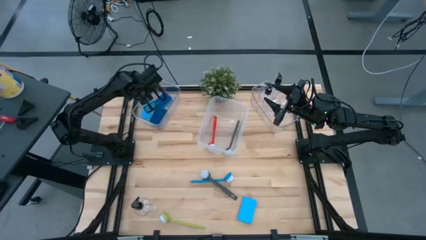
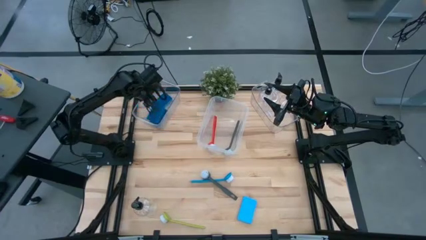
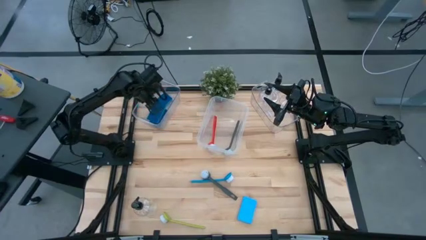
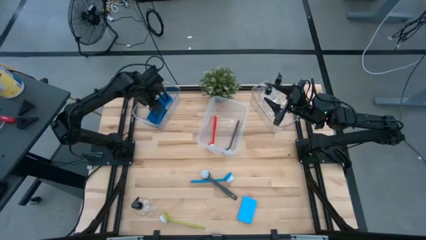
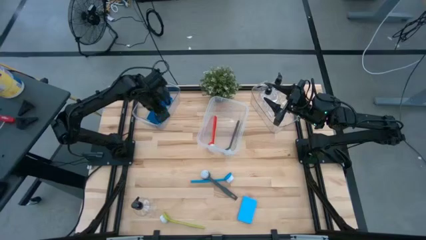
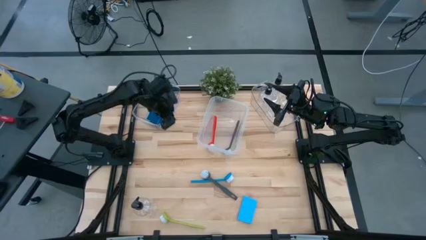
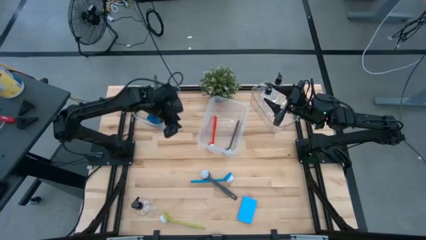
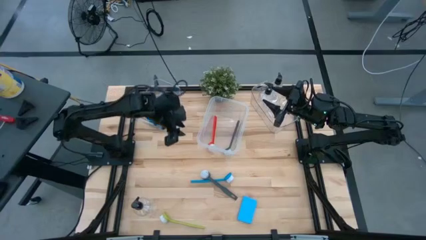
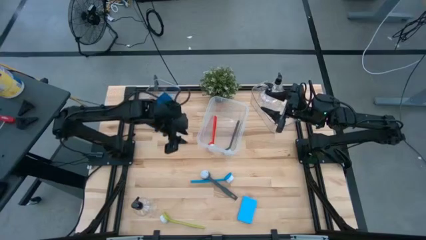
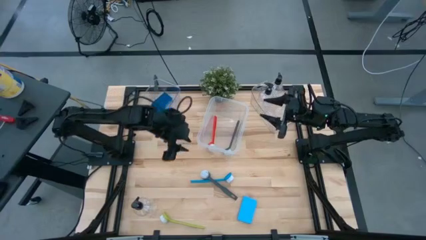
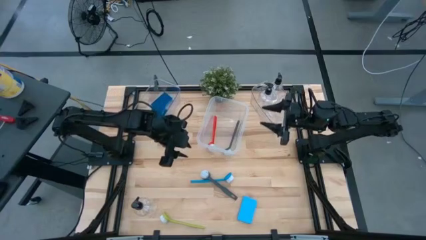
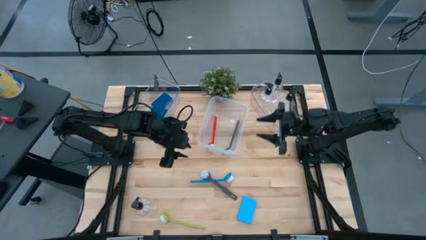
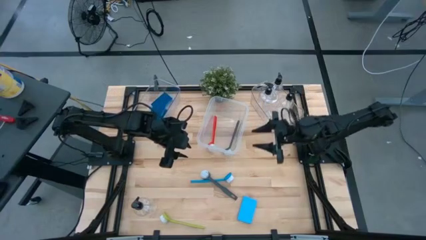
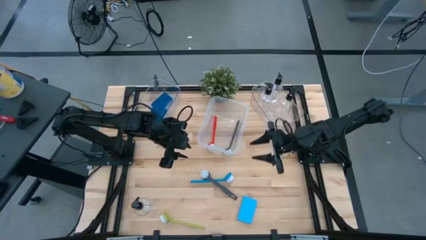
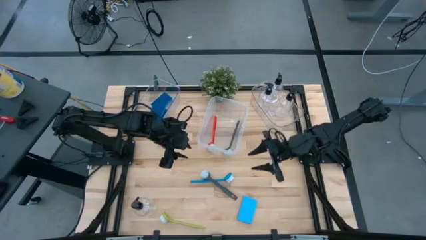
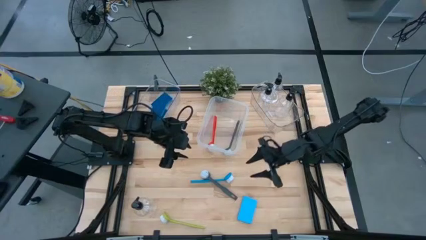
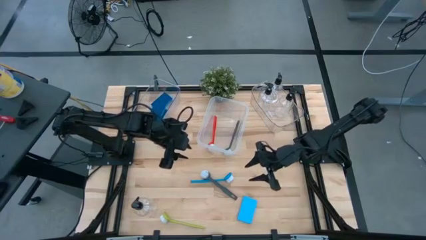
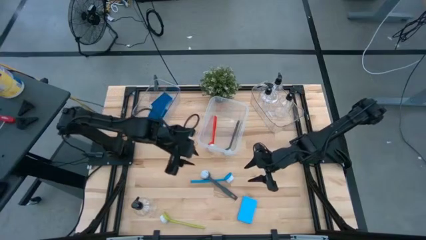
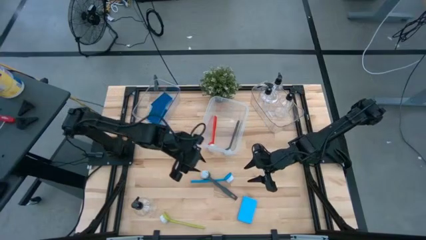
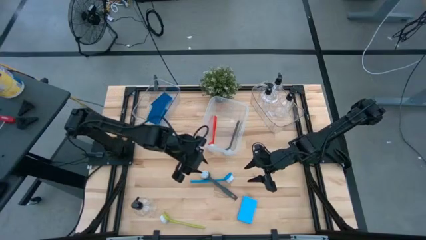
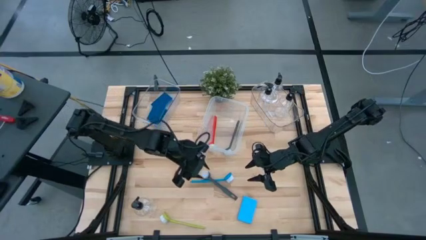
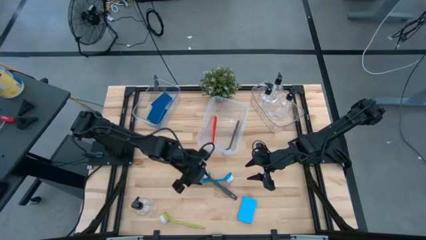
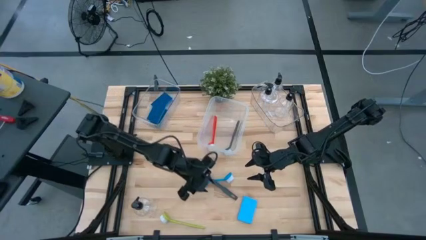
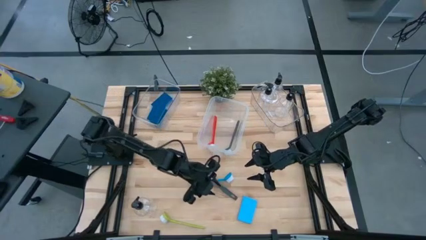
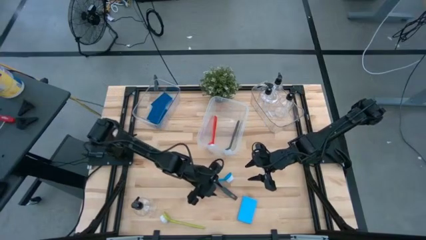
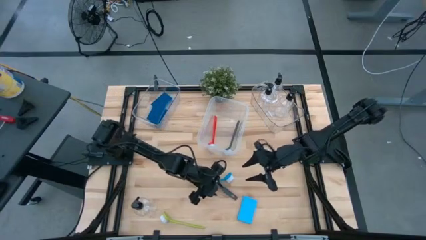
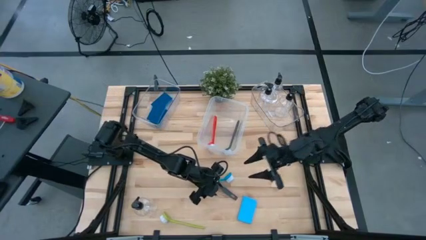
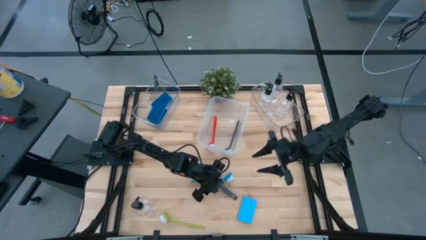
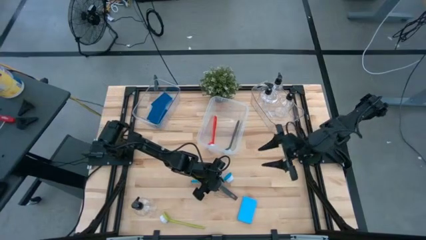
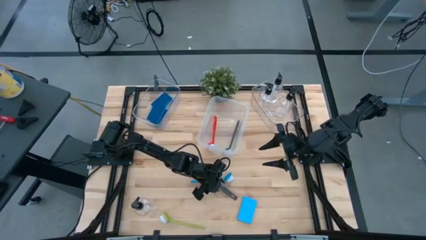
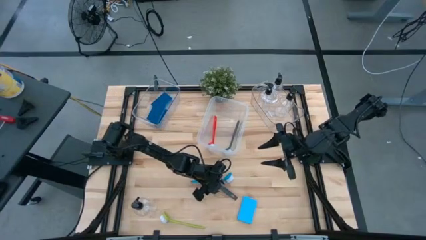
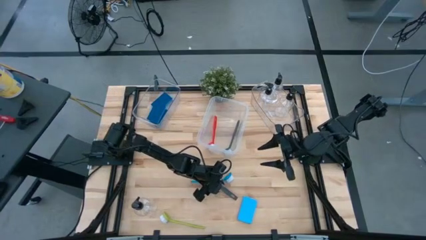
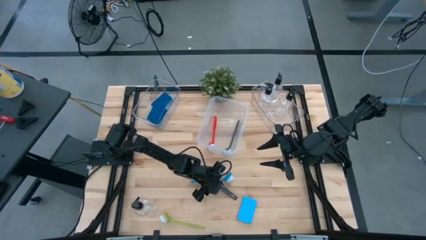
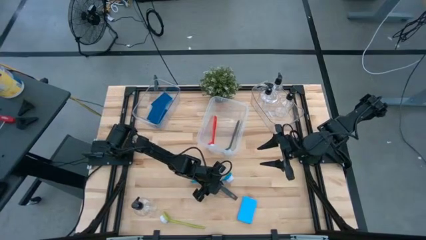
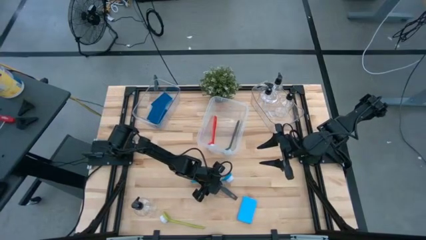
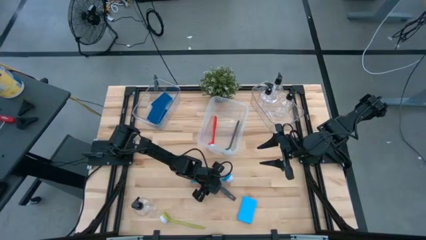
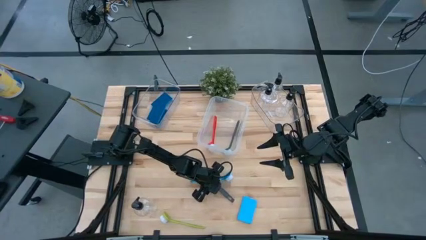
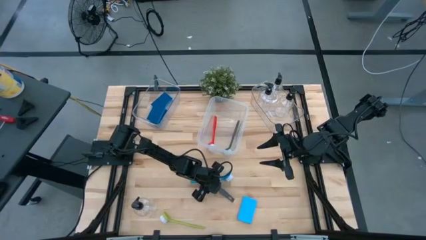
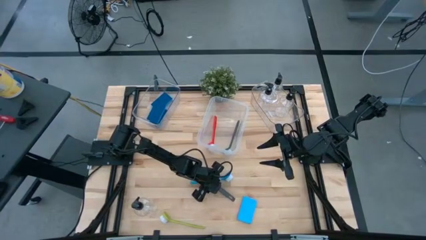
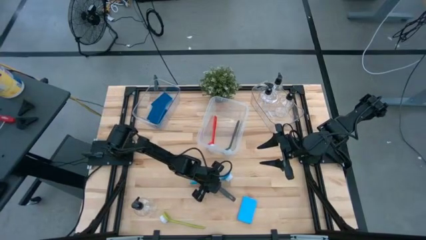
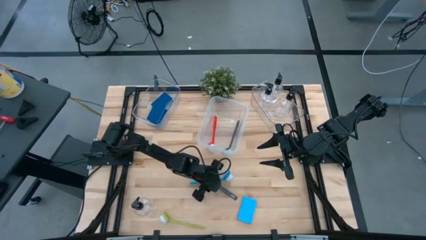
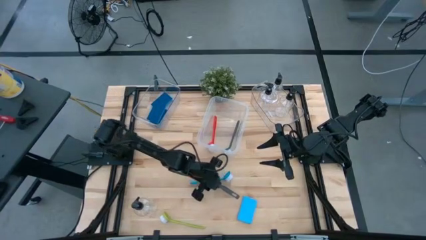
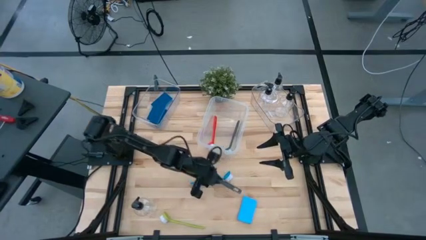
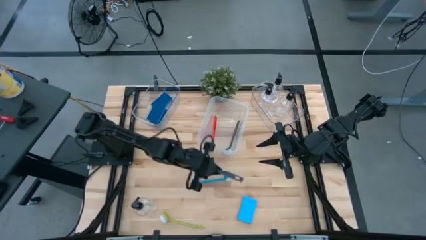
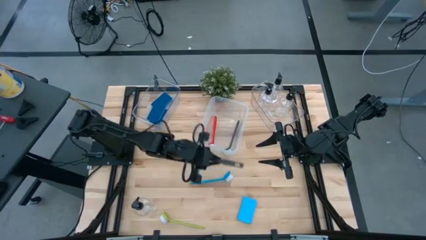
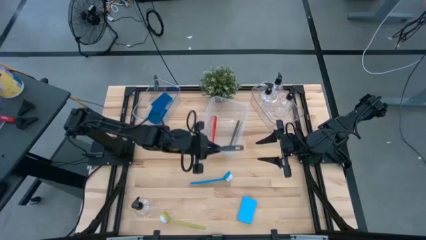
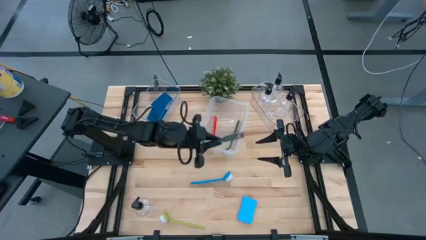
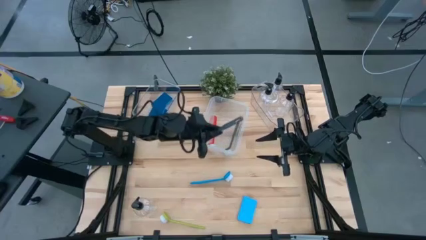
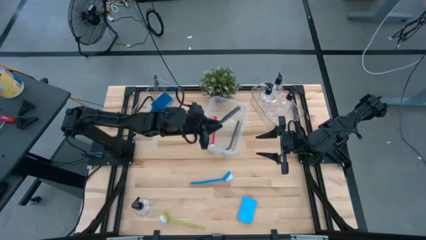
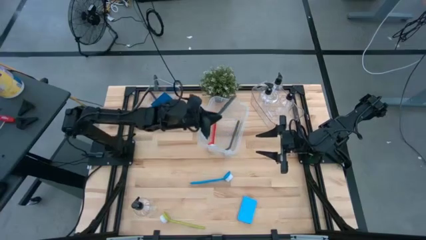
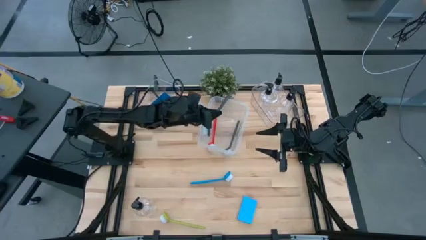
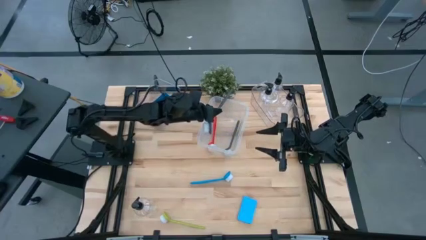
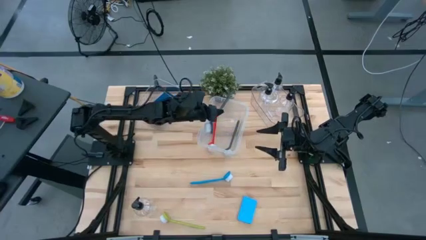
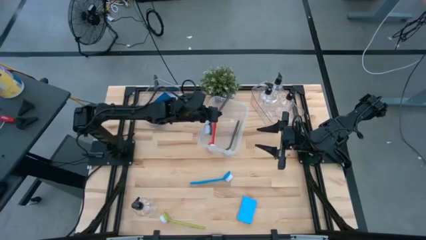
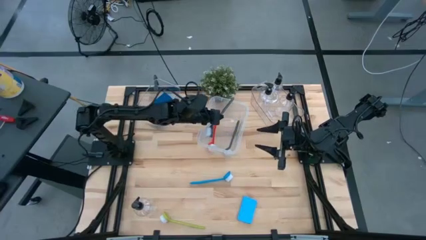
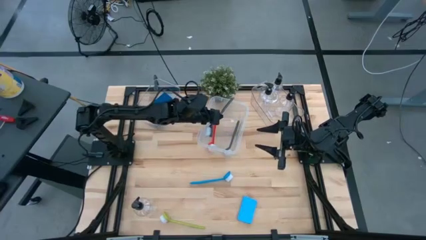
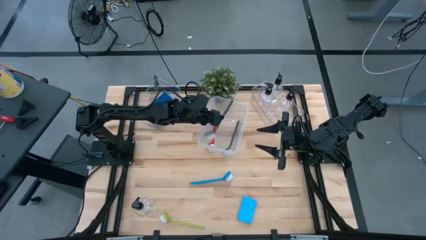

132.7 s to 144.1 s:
Task: Pick & Place Kitchen Sink Supplies
Put the gray dish brush into the transparent container
